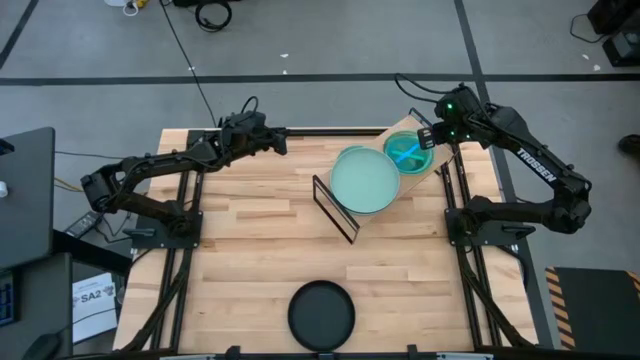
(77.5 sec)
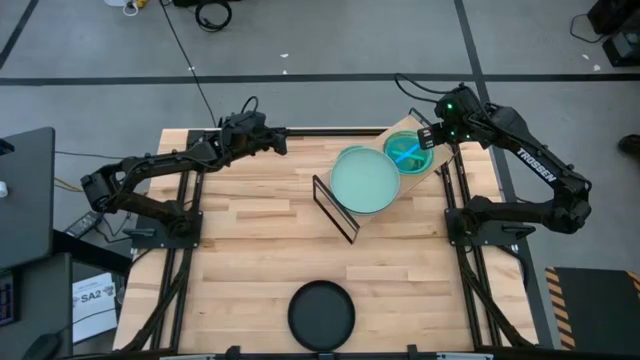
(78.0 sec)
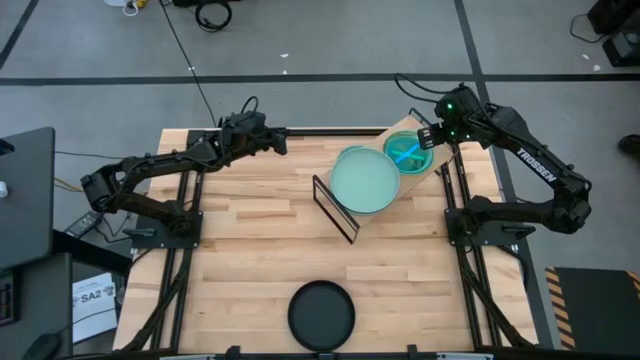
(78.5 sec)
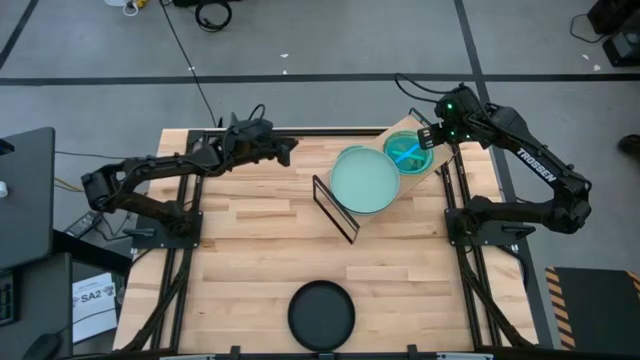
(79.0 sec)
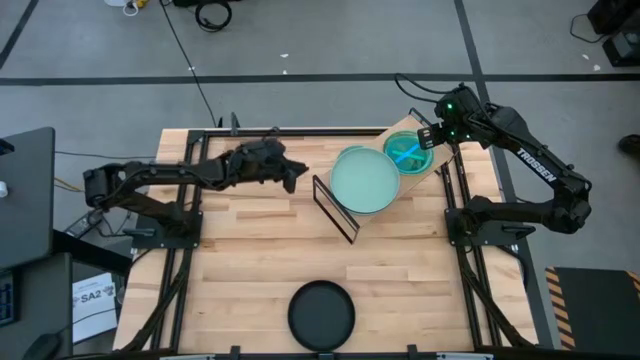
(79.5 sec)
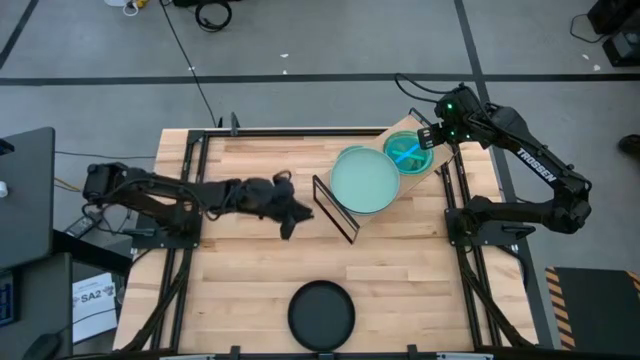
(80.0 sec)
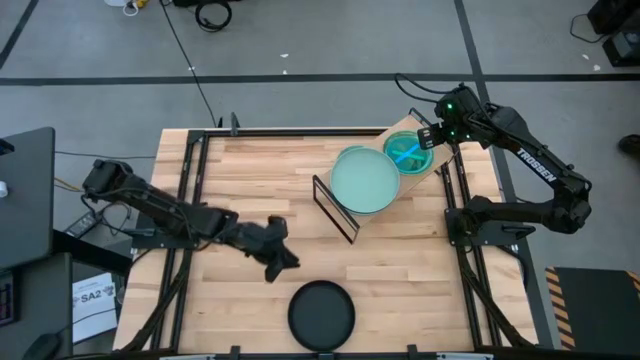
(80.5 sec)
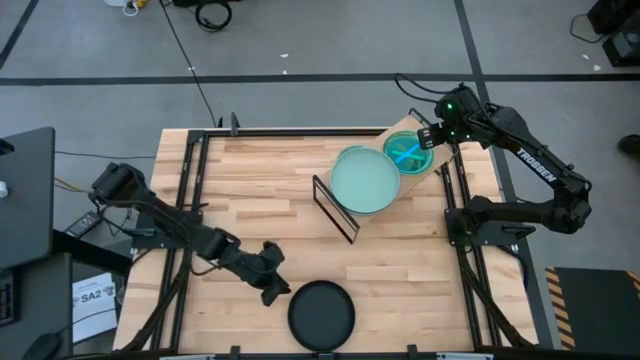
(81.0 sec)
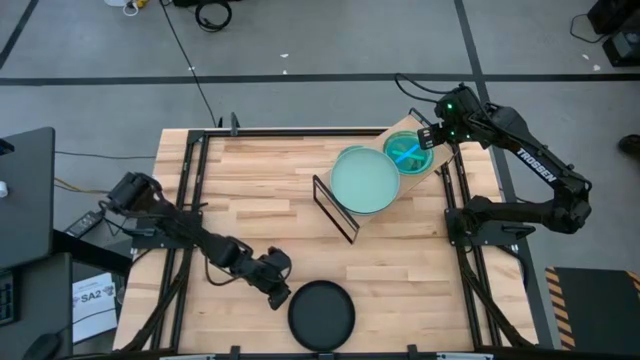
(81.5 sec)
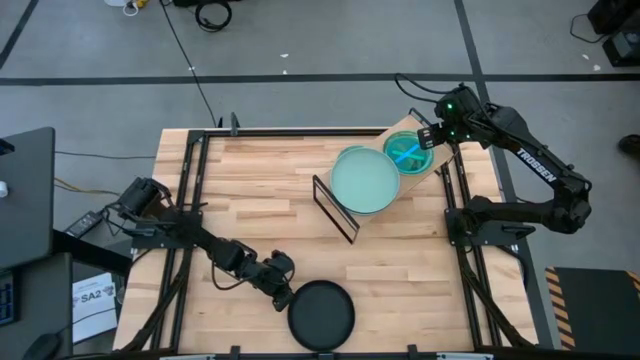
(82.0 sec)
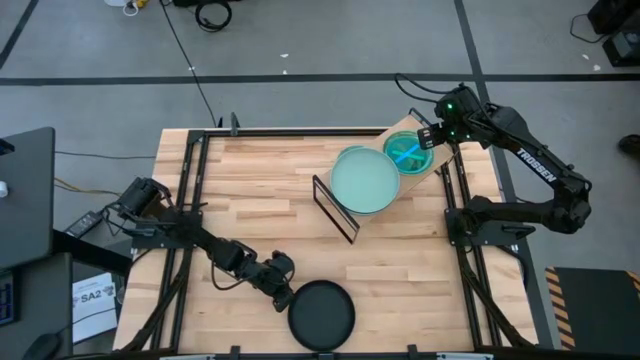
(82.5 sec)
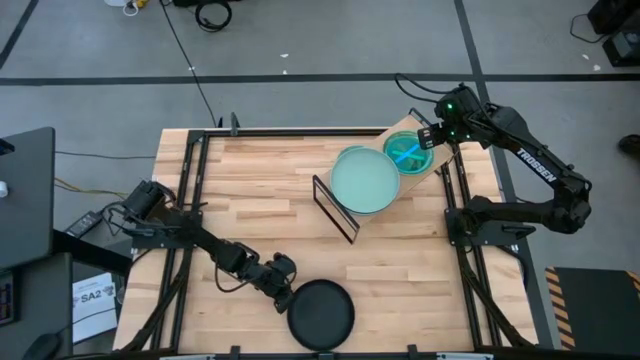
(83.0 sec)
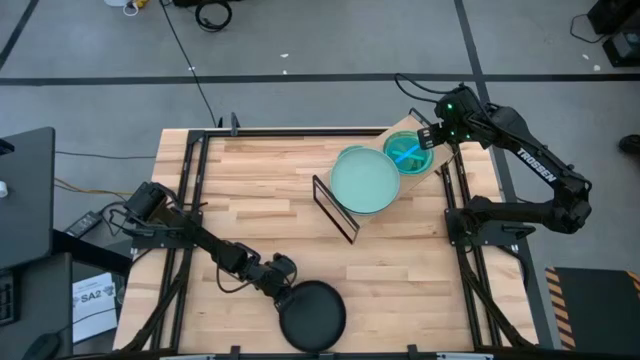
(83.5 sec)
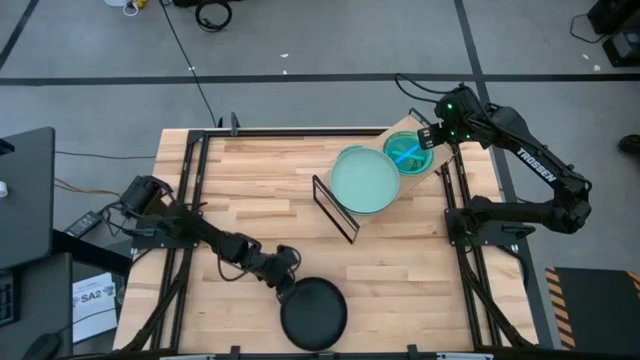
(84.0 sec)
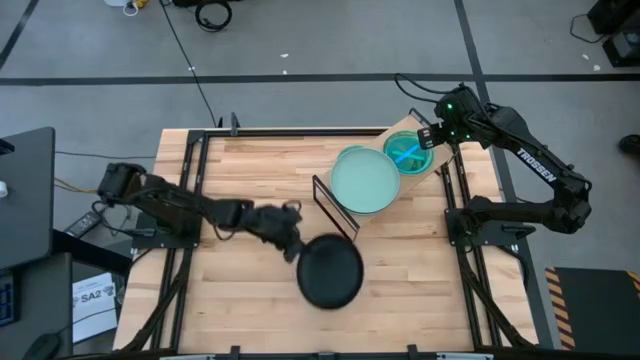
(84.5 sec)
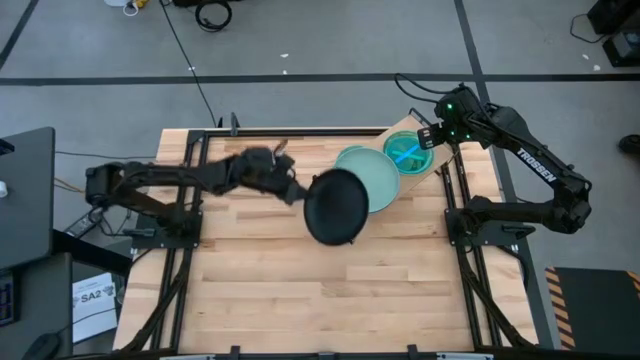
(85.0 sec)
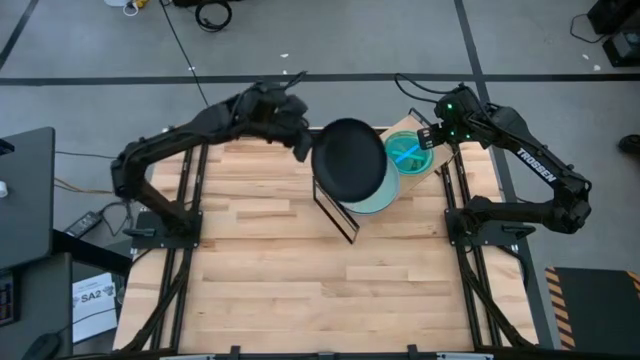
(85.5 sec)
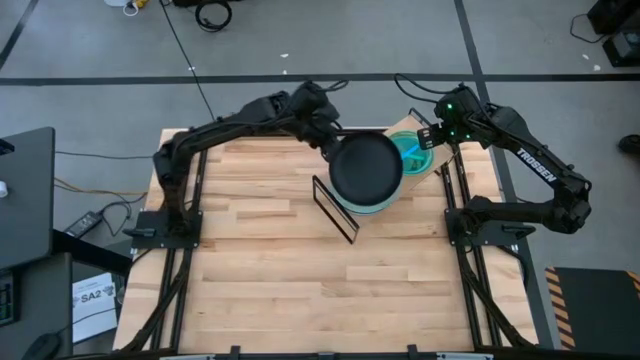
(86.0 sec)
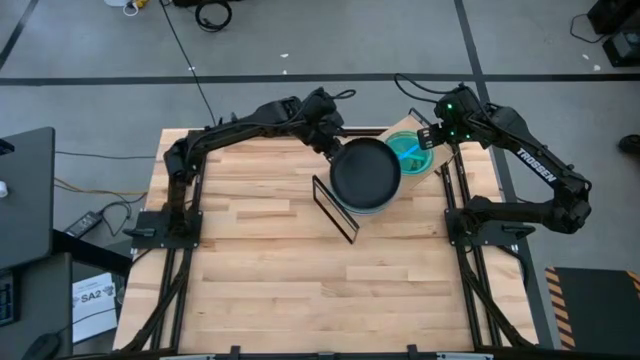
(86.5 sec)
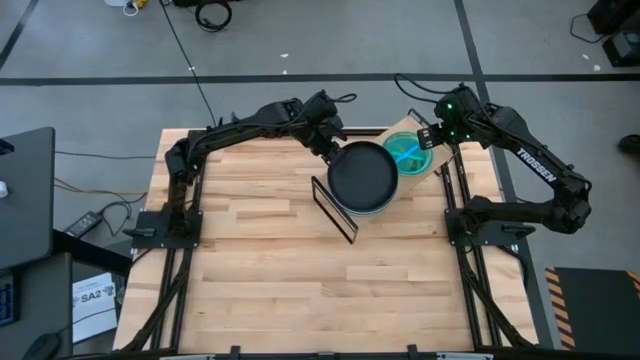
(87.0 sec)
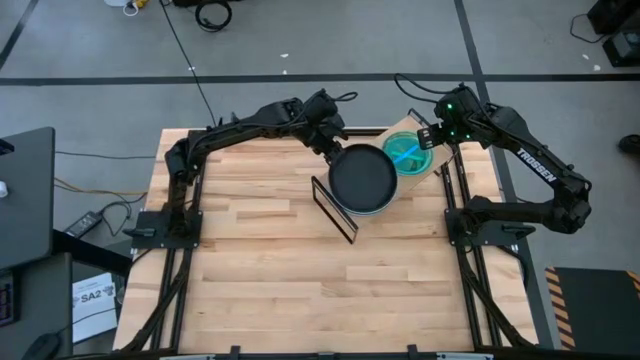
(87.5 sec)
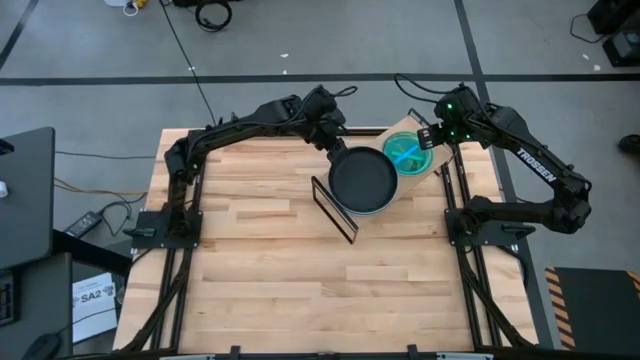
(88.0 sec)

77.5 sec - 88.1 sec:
Task: Place and stack plates onto a shelf
Stack the big black plate on top of the big gray plate on the shelf

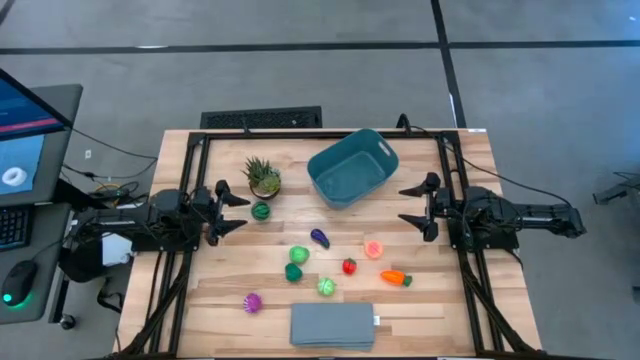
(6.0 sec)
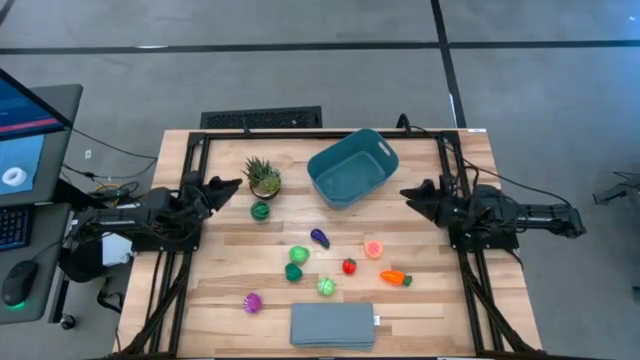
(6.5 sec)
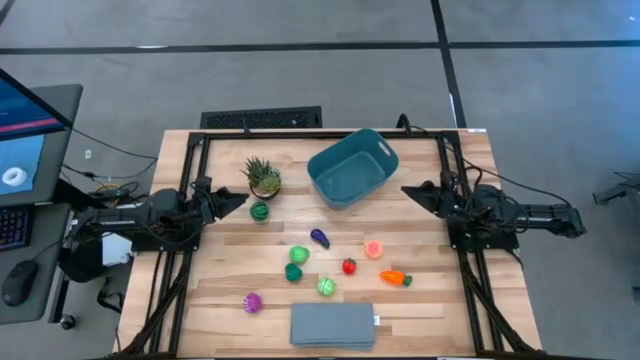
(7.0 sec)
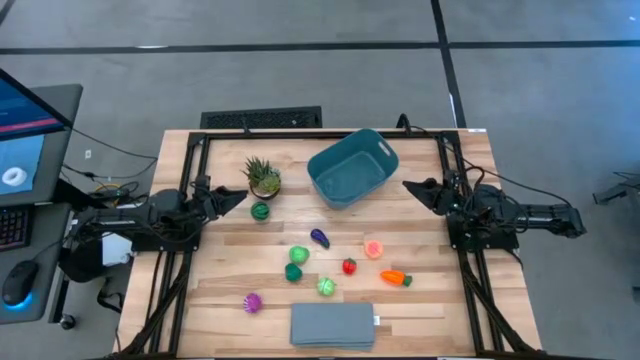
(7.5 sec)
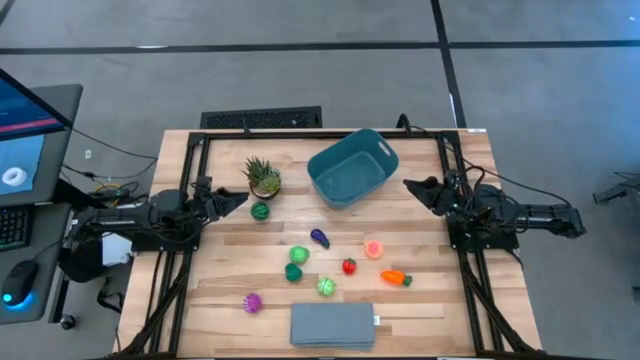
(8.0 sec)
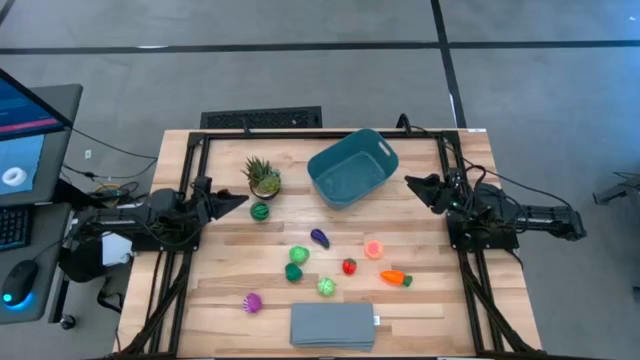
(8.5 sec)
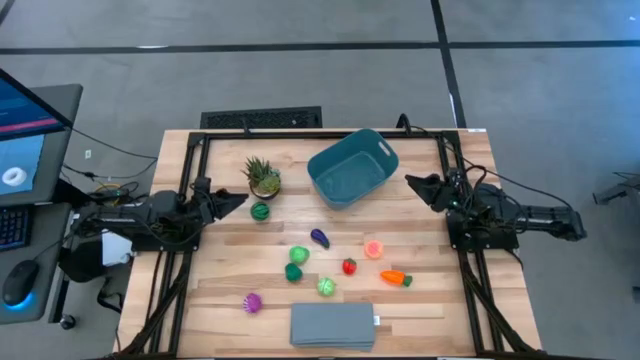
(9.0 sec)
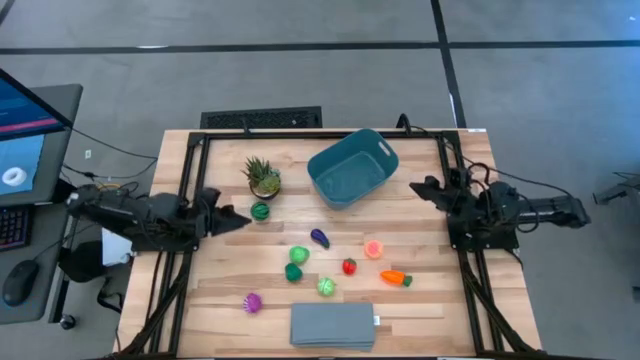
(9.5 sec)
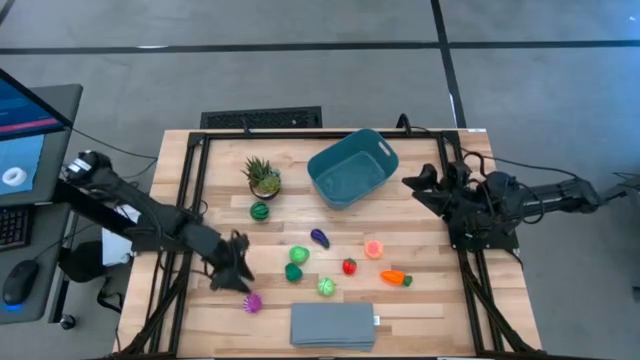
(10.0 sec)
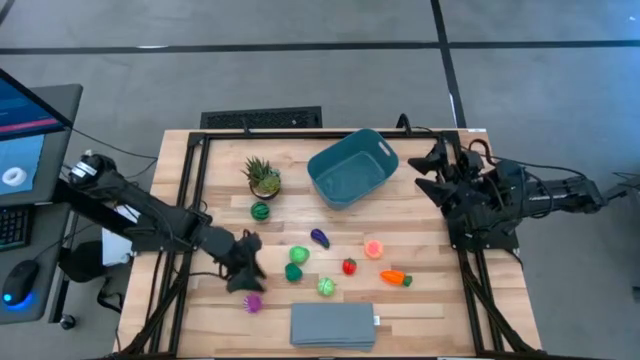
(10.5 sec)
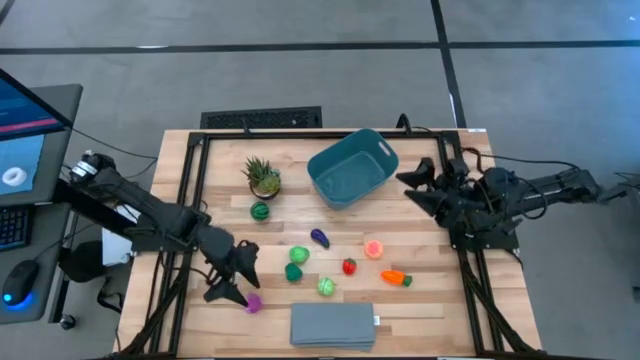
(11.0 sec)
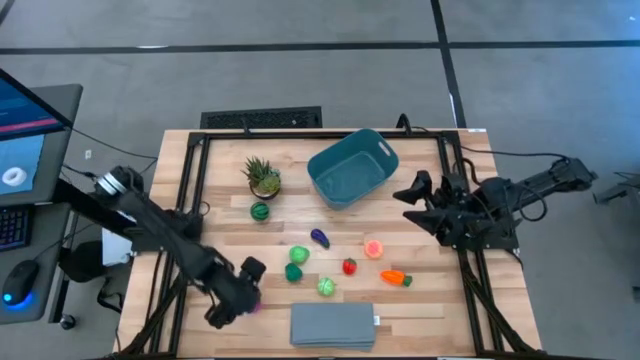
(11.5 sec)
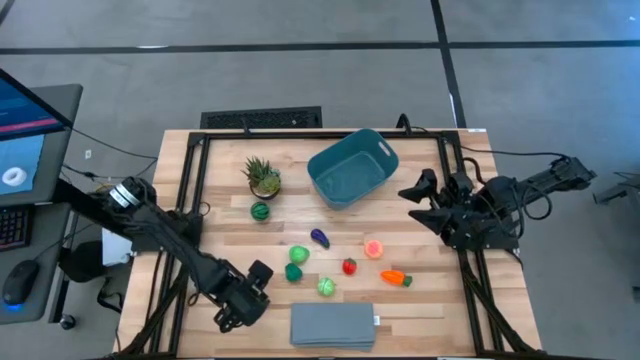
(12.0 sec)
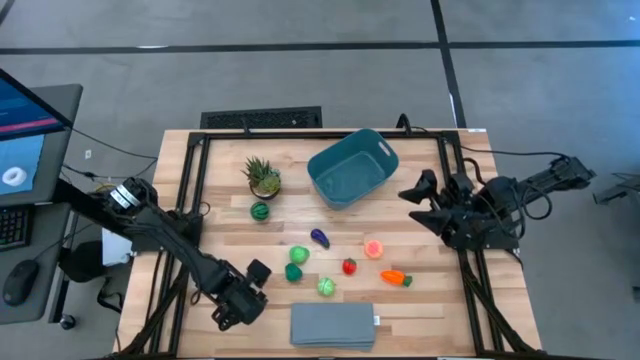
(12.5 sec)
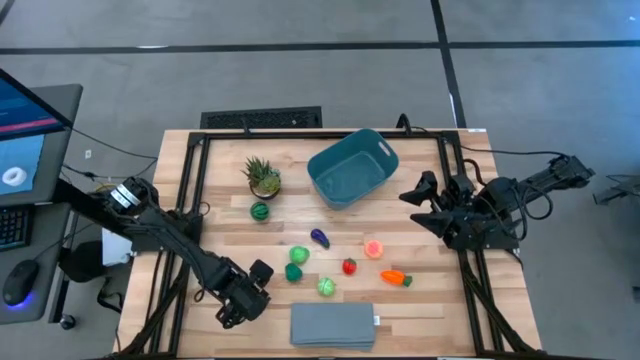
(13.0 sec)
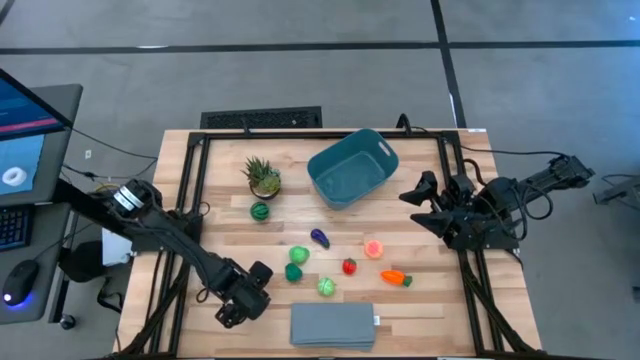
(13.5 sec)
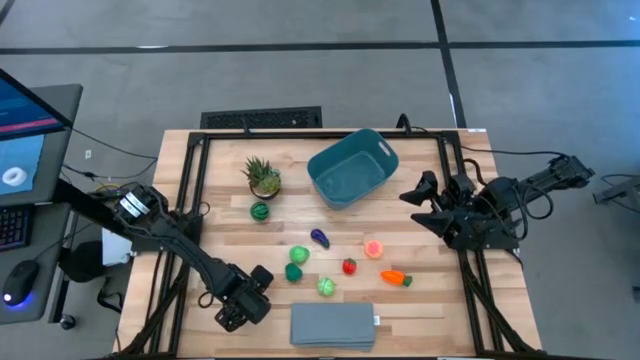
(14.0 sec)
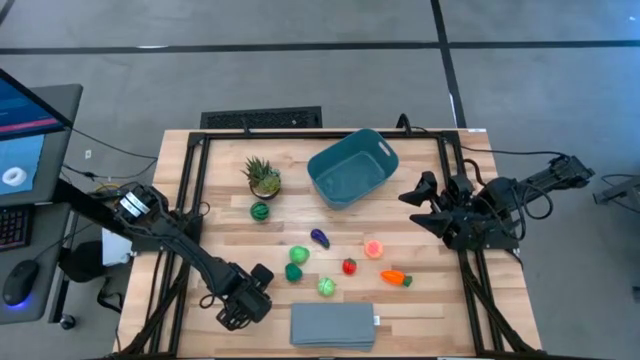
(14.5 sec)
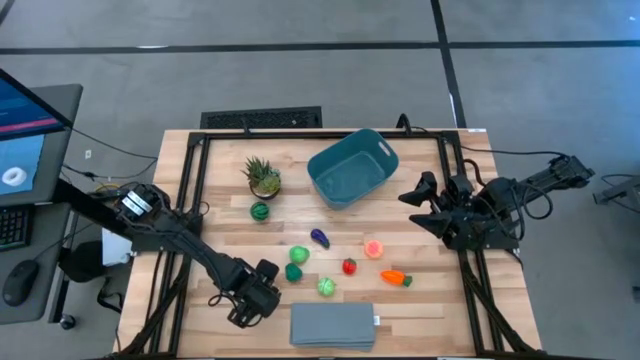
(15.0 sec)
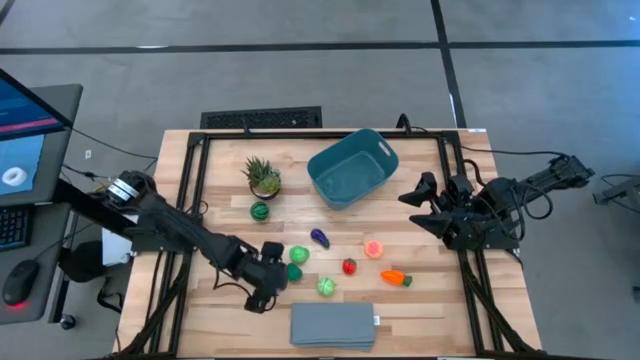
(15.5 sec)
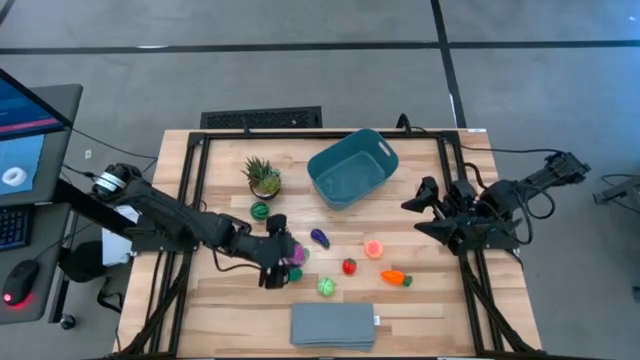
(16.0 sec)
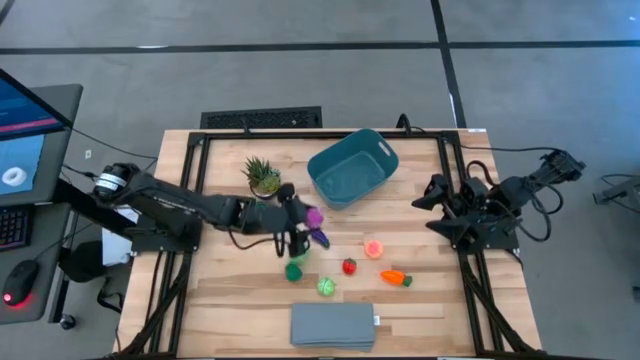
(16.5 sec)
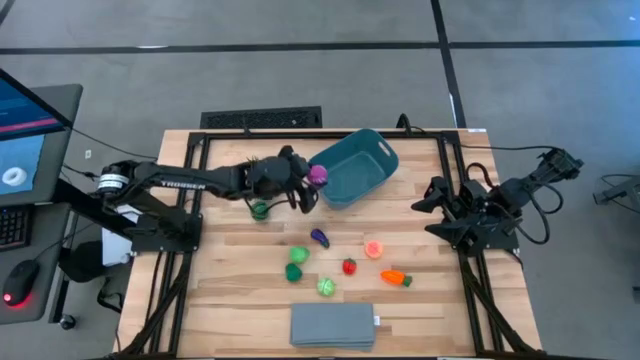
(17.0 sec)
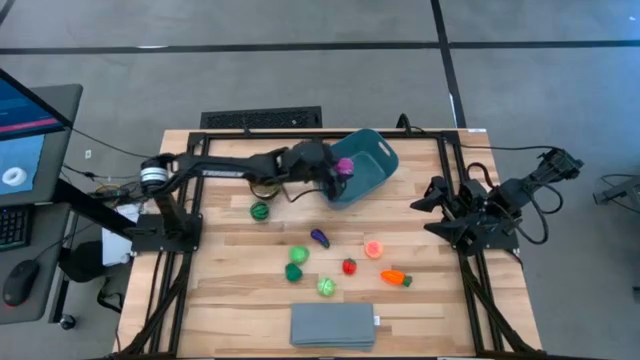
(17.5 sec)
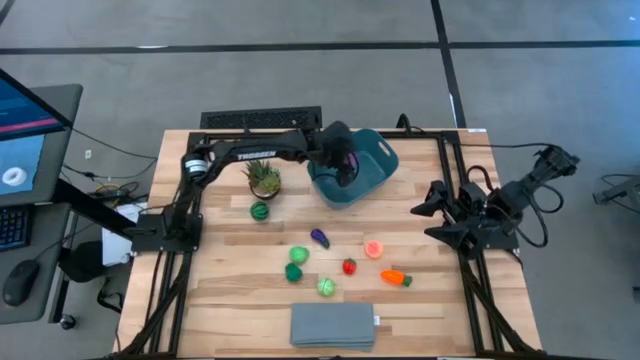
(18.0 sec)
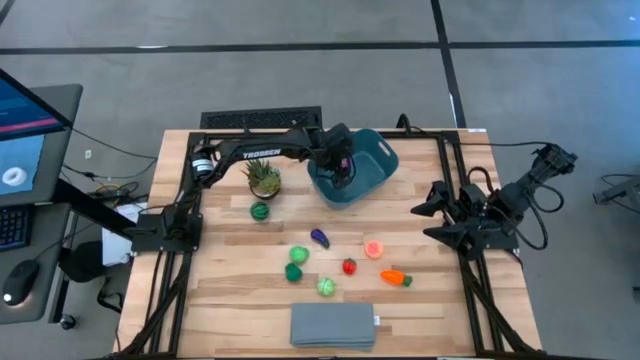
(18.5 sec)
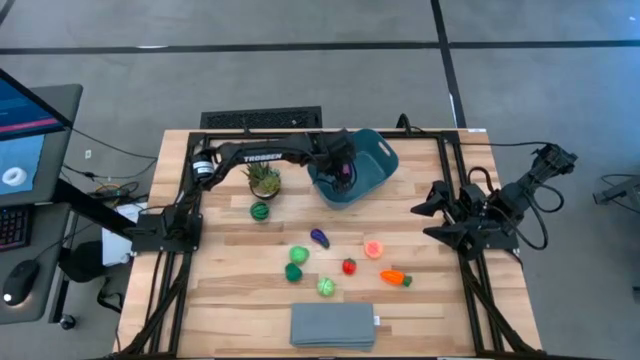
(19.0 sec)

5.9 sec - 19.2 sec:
Task: Pick and placing Produce into tupperware
Put the onion into the bin
